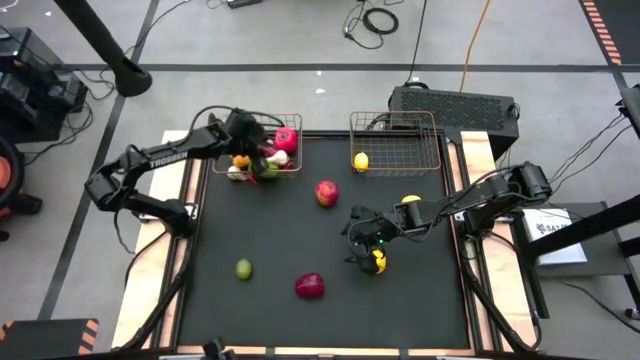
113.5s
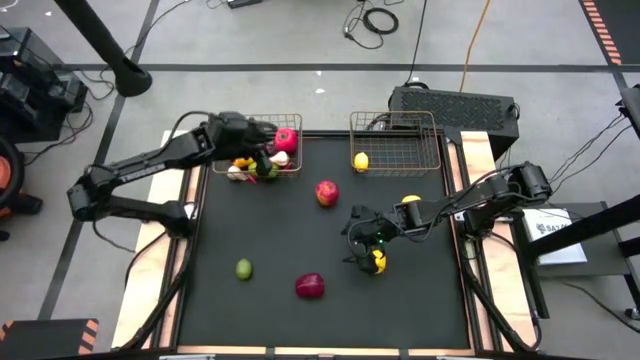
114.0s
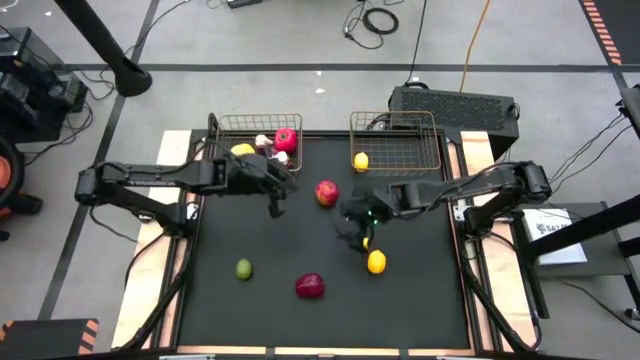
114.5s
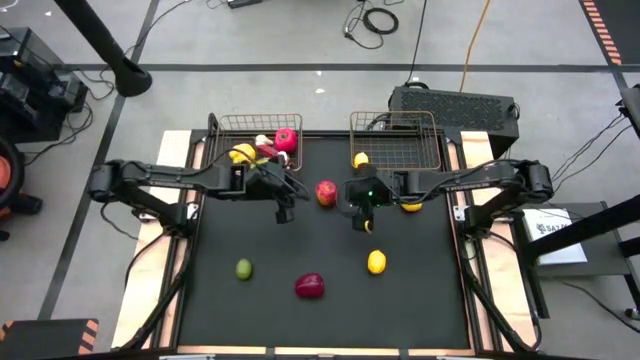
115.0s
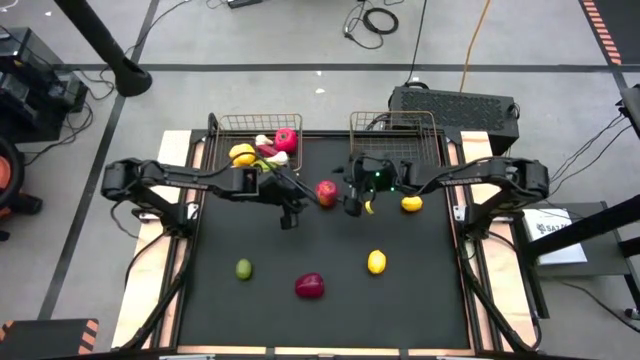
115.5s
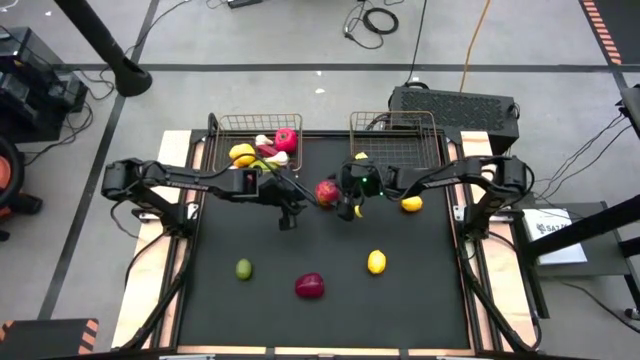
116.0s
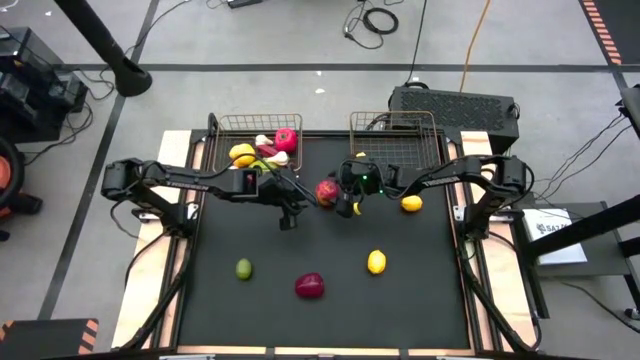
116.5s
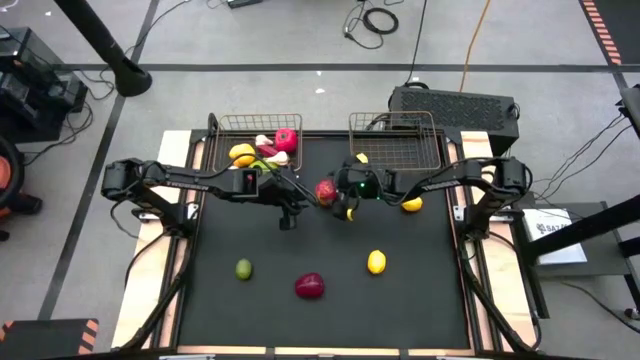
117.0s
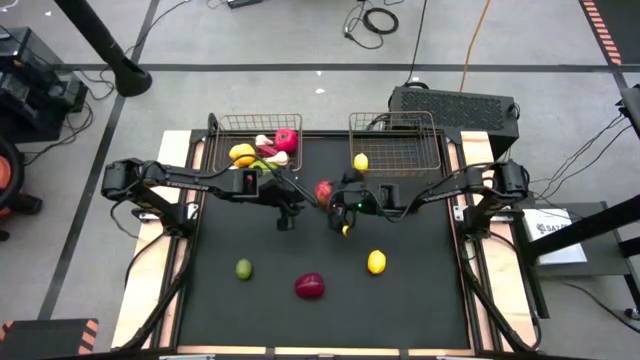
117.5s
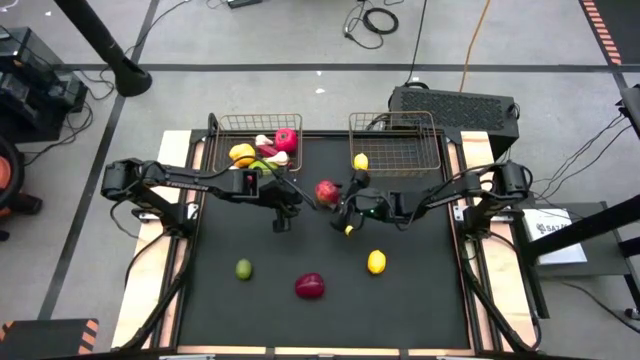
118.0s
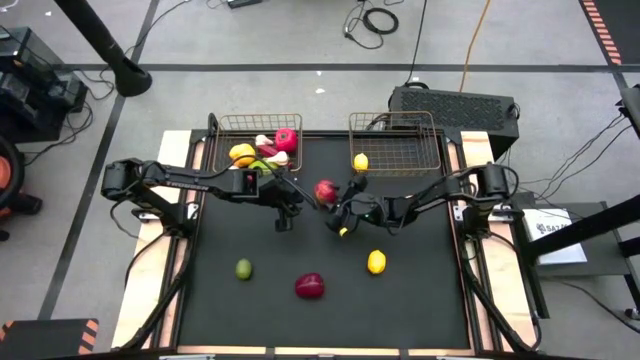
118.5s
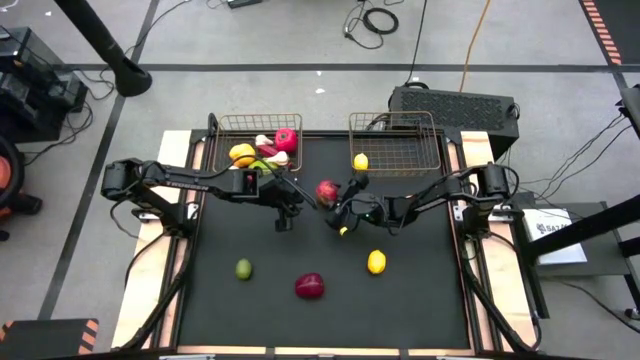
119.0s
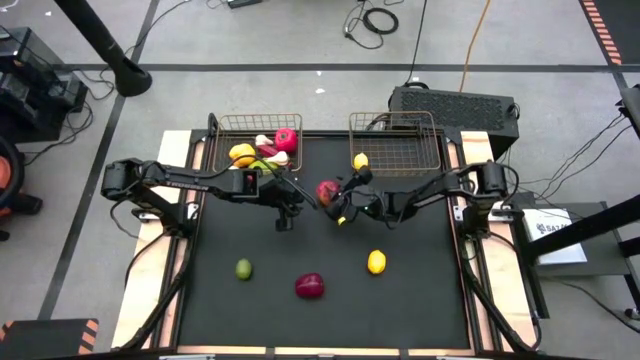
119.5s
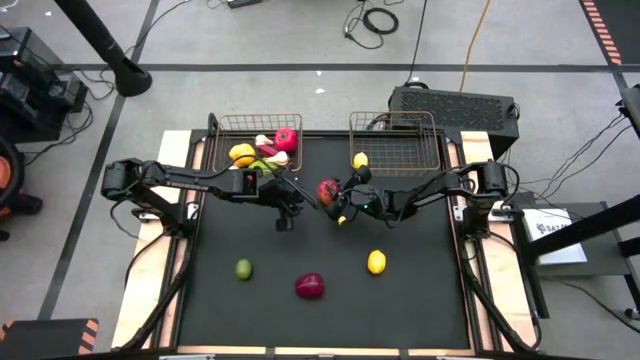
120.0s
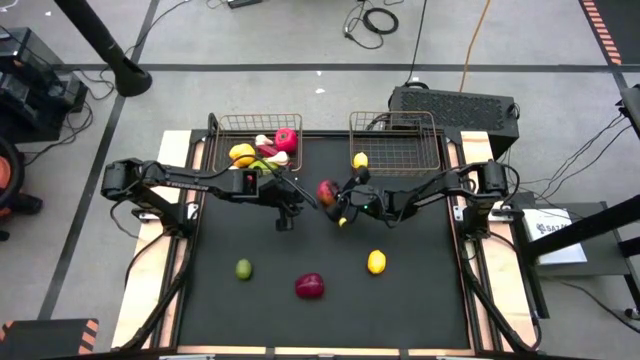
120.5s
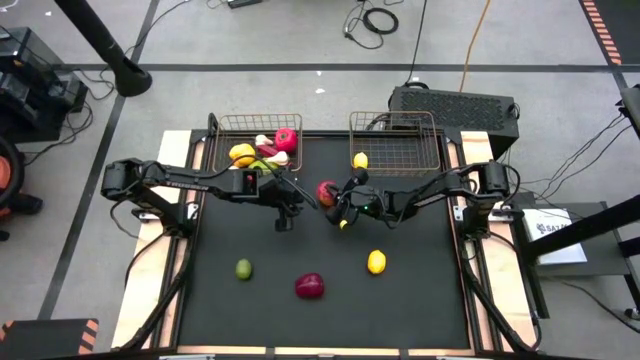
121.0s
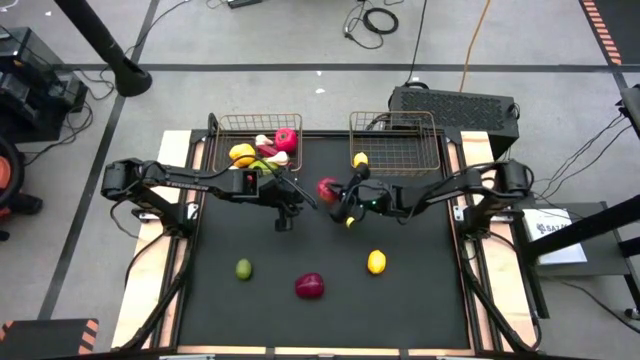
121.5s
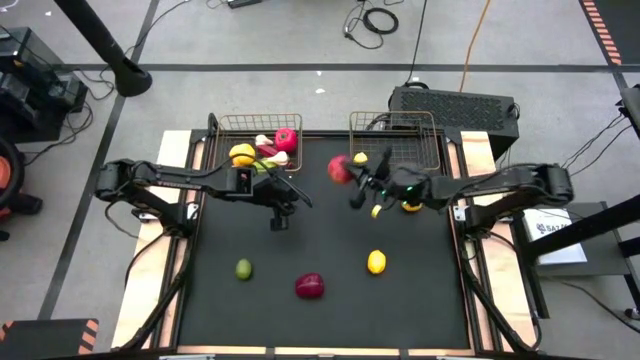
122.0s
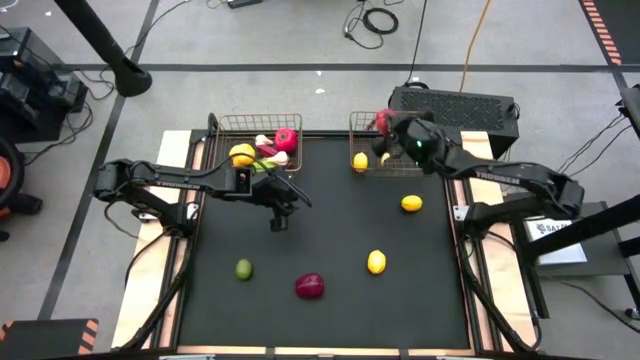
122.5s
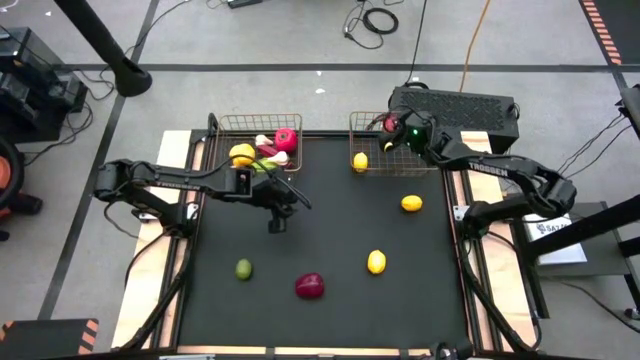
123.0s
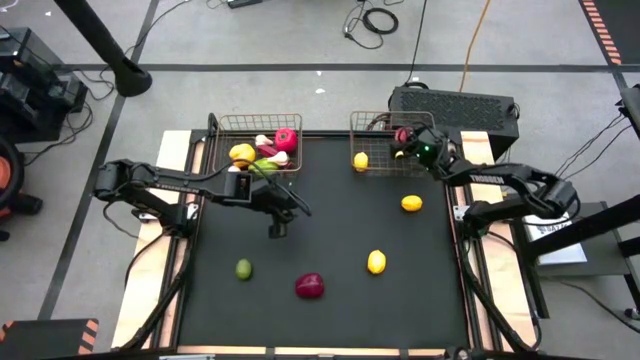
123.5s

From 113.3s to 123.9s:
Task: Sort produce into baskets
Put the top red apple into the right wire basket

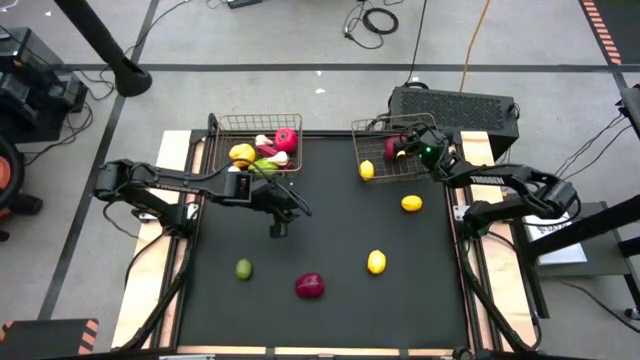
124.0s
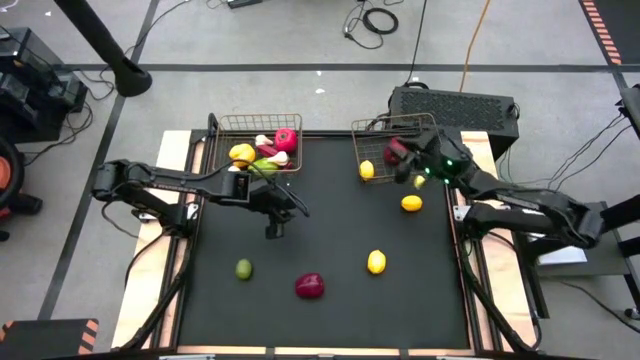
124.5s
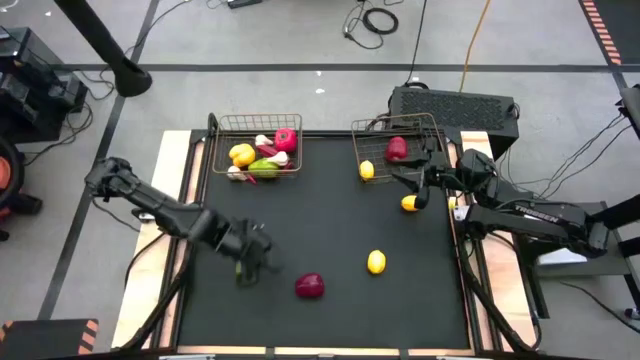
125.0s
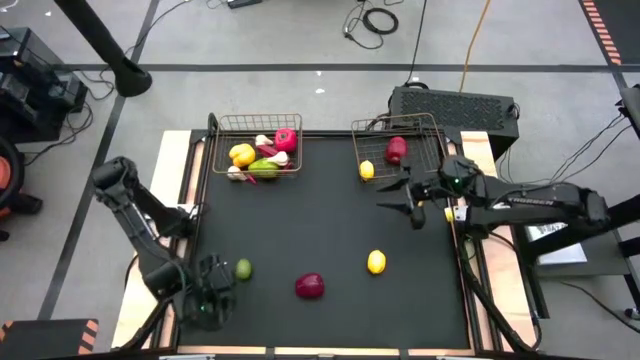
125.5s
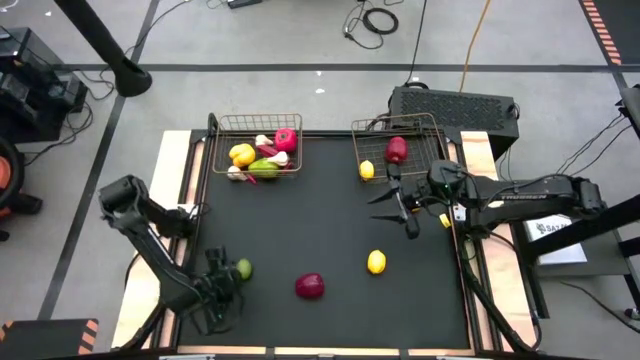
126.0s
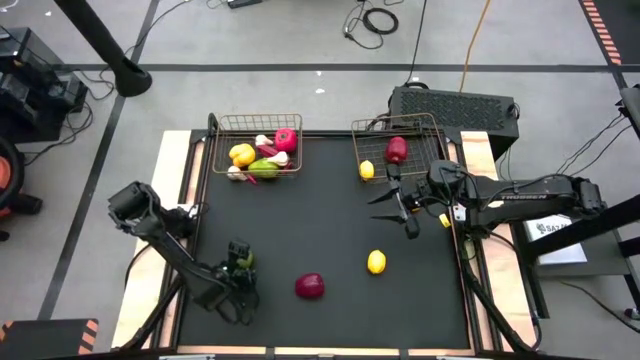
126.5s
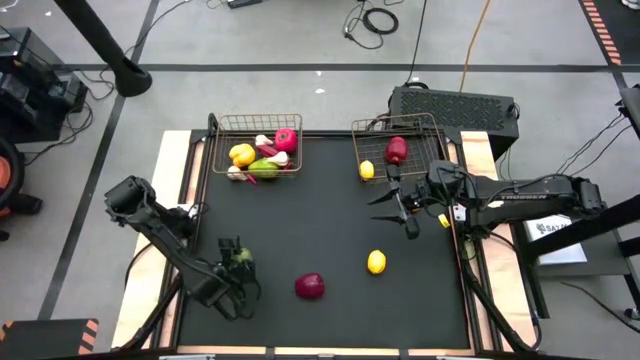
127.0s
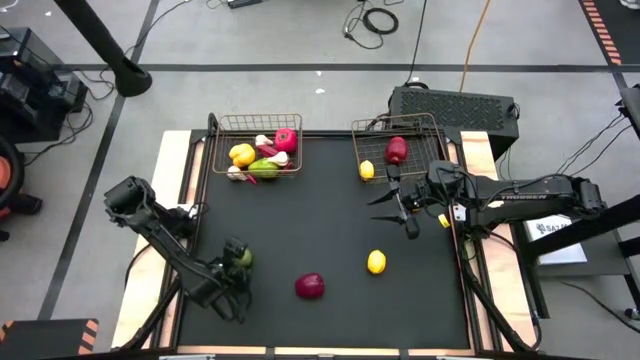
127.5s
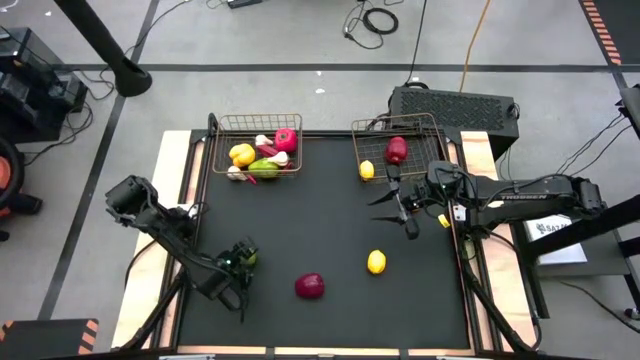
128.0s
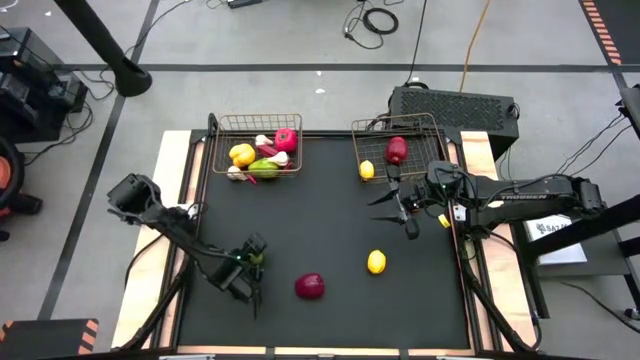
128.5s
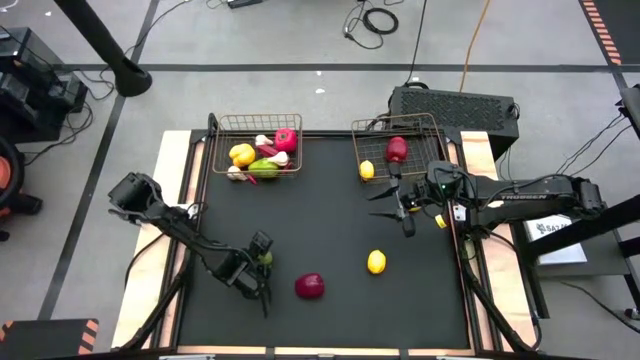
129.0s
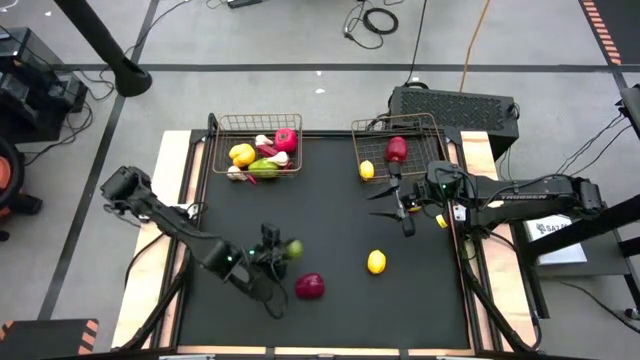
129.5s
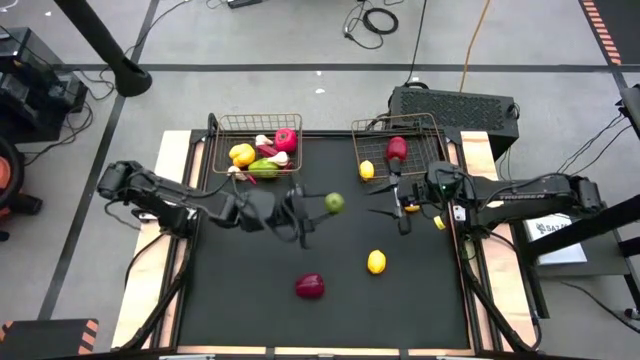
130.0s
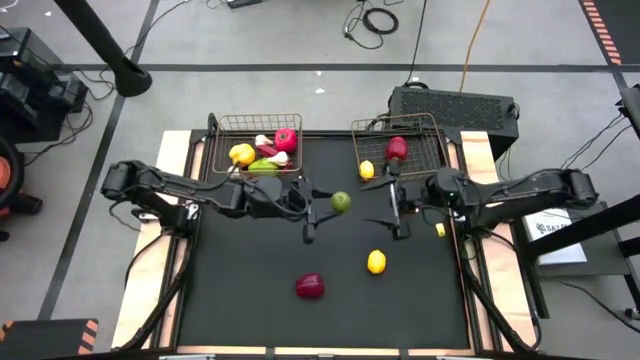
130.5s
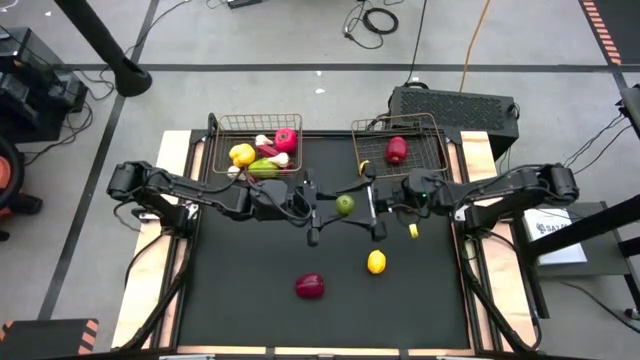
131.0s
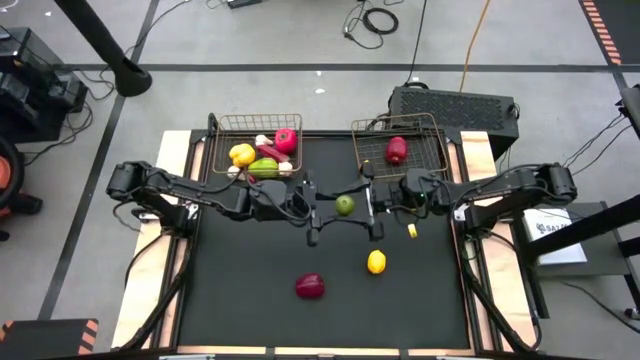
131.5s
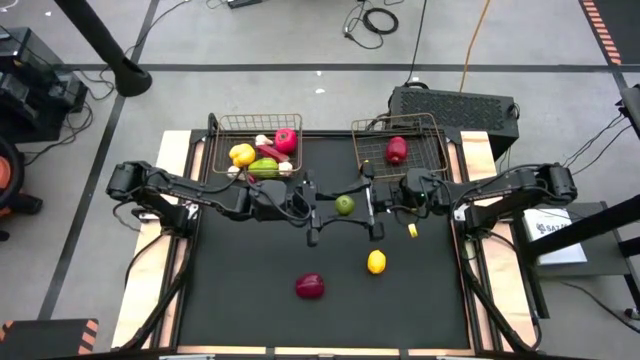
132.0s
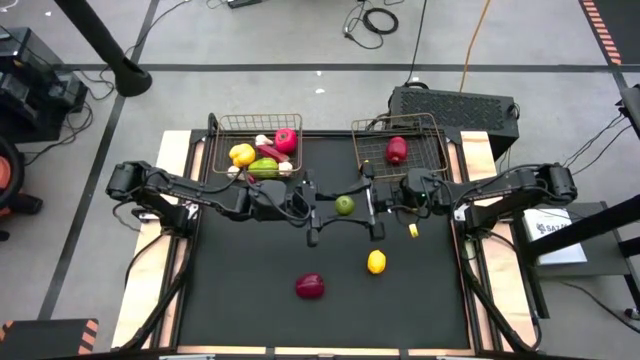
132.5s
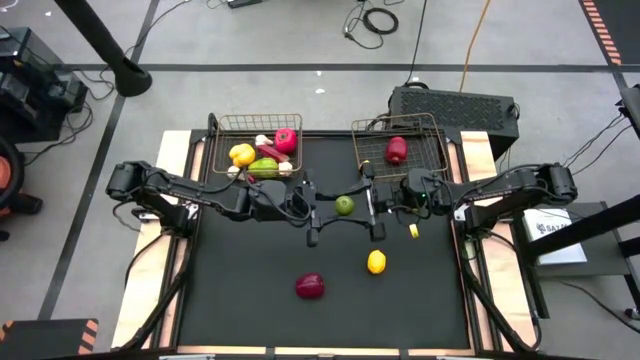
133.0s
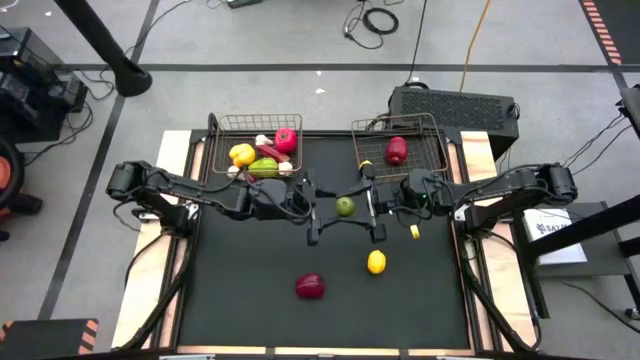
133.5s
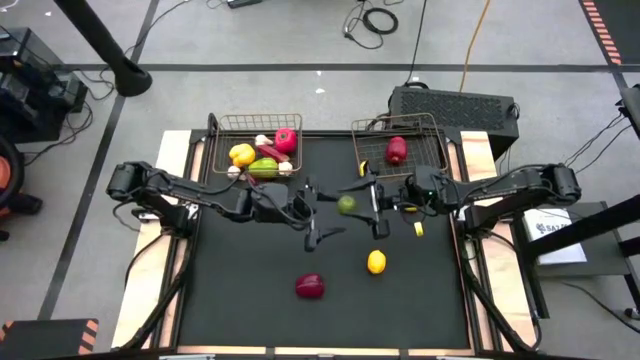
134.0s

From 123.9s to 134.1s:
Put the green lime into the right wire basket
